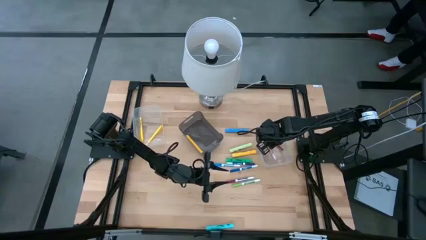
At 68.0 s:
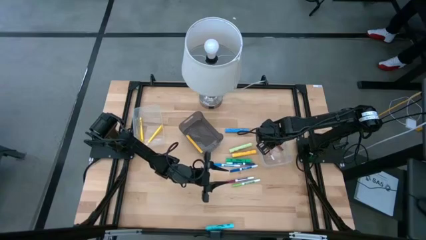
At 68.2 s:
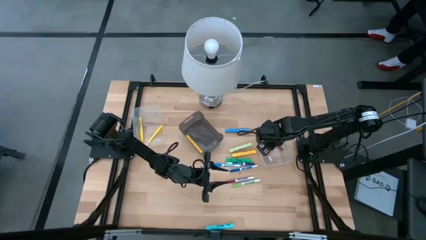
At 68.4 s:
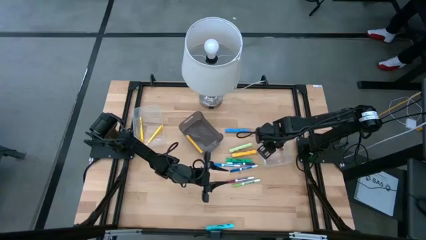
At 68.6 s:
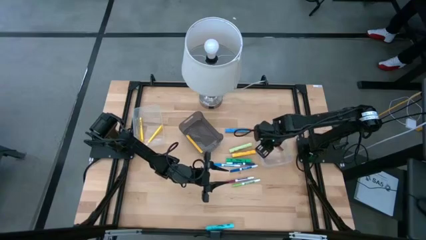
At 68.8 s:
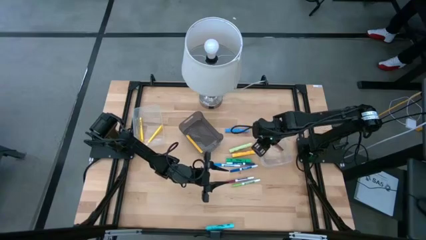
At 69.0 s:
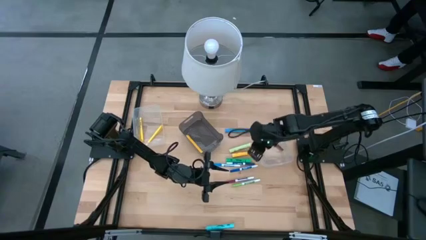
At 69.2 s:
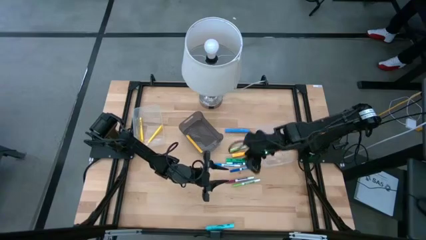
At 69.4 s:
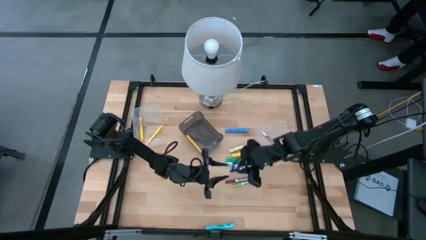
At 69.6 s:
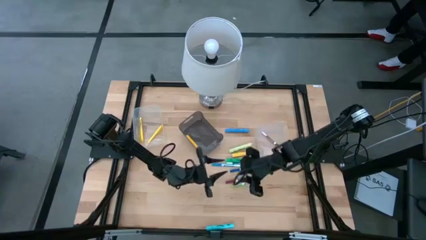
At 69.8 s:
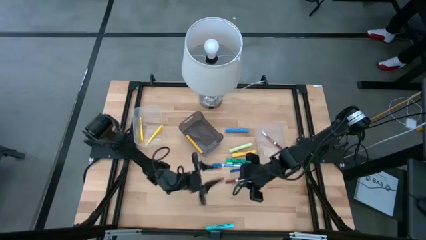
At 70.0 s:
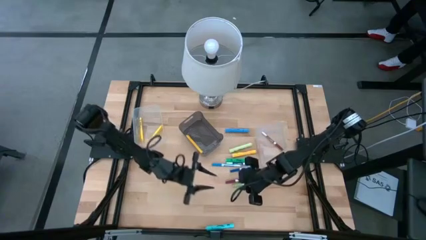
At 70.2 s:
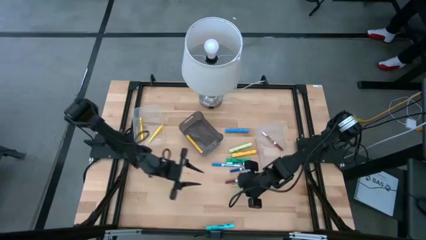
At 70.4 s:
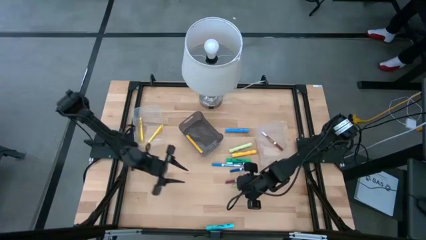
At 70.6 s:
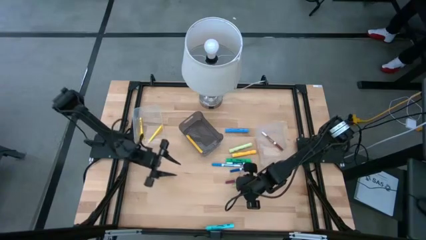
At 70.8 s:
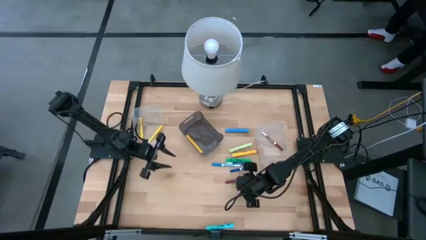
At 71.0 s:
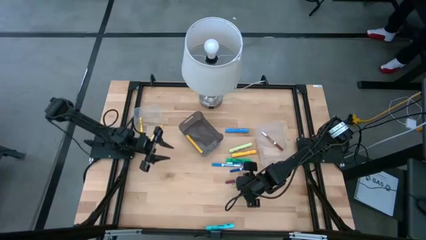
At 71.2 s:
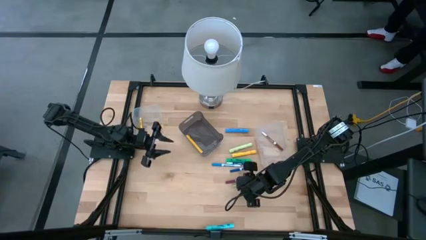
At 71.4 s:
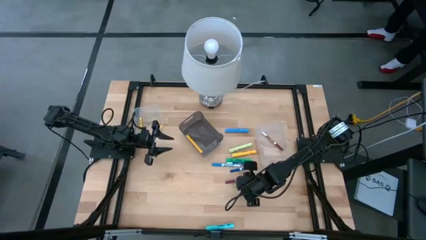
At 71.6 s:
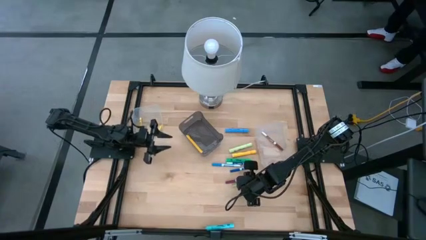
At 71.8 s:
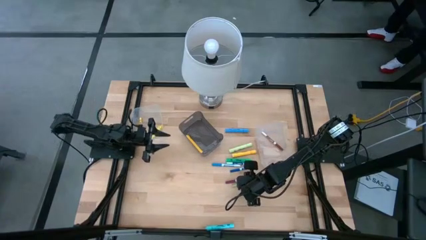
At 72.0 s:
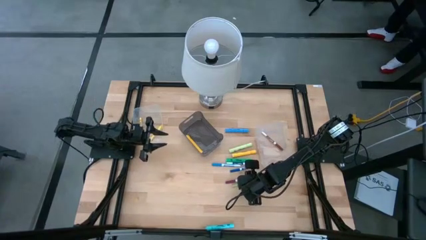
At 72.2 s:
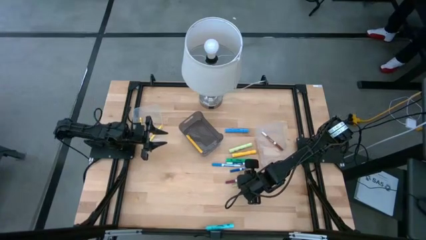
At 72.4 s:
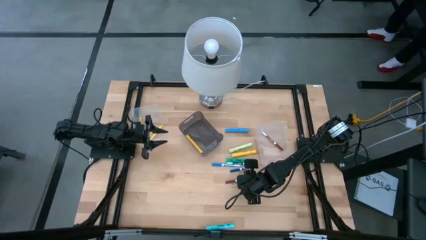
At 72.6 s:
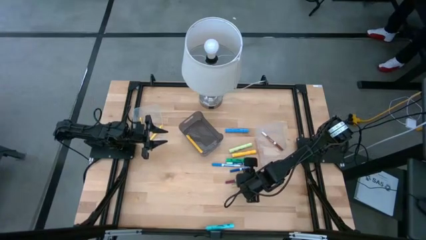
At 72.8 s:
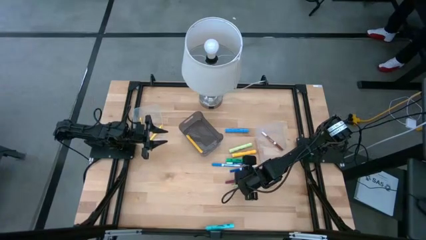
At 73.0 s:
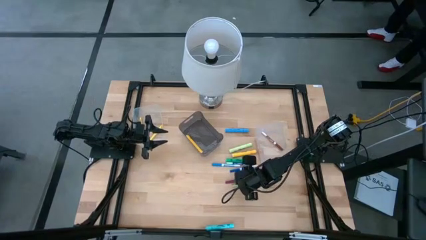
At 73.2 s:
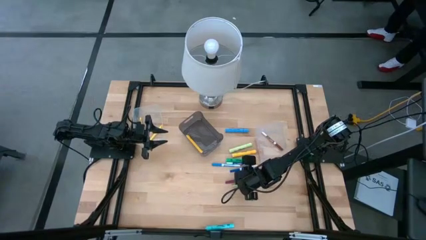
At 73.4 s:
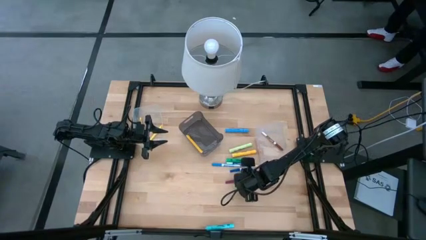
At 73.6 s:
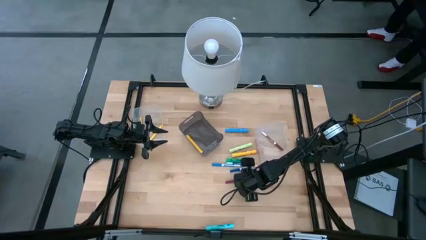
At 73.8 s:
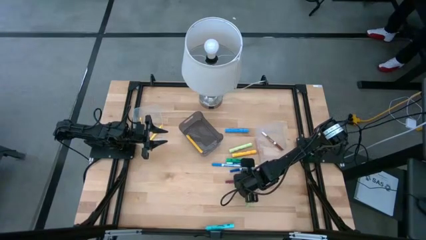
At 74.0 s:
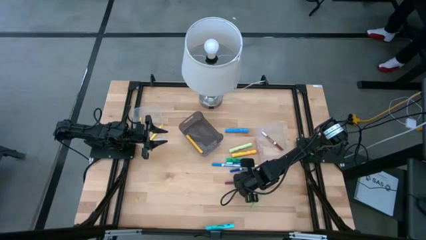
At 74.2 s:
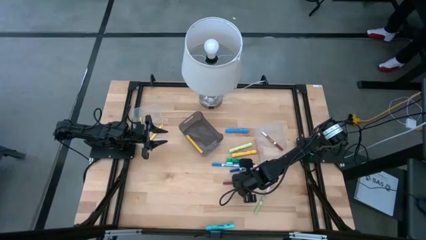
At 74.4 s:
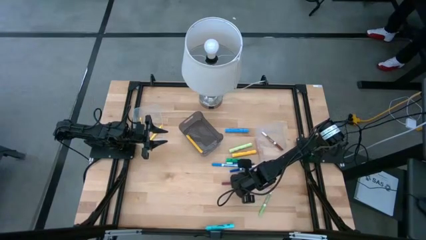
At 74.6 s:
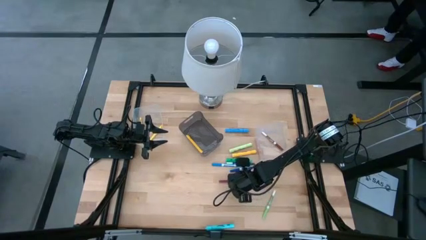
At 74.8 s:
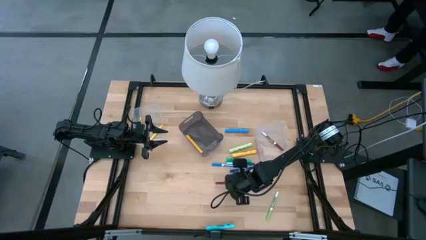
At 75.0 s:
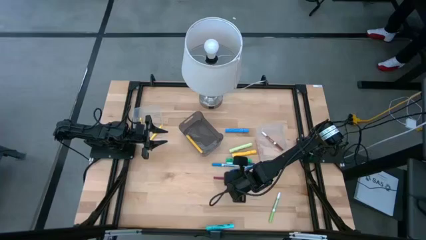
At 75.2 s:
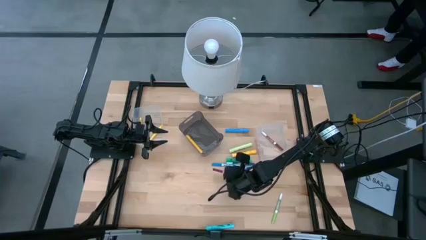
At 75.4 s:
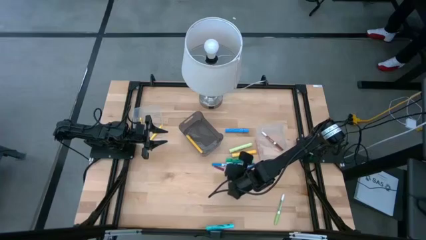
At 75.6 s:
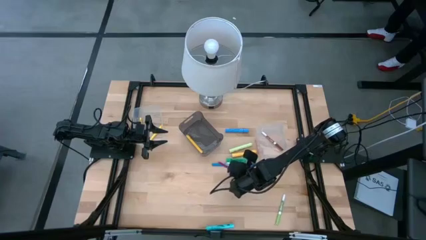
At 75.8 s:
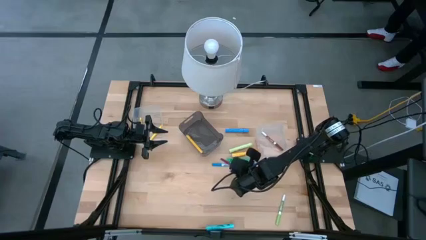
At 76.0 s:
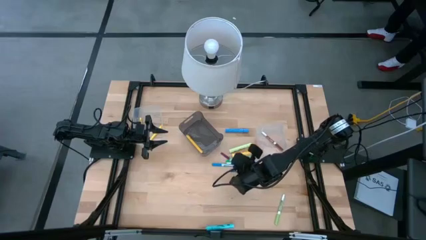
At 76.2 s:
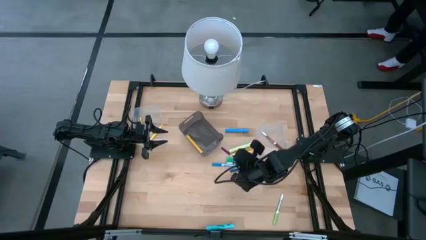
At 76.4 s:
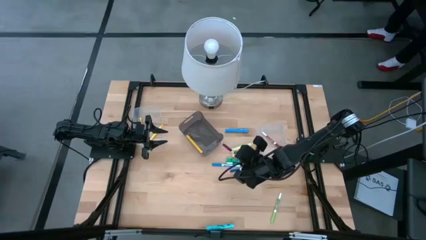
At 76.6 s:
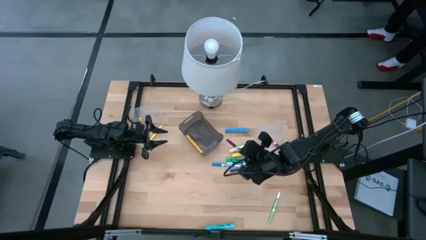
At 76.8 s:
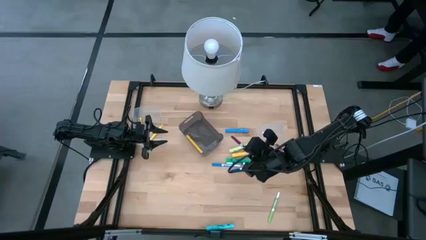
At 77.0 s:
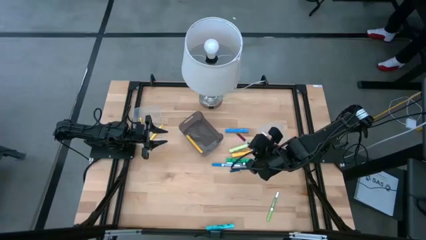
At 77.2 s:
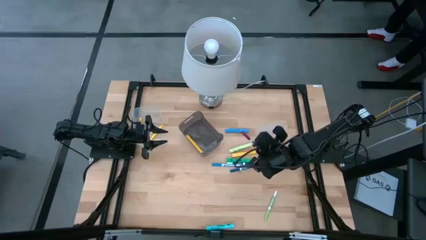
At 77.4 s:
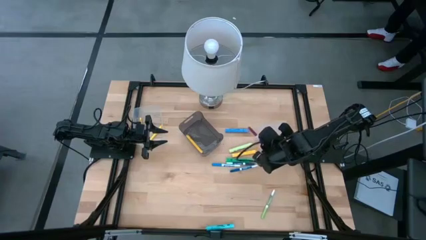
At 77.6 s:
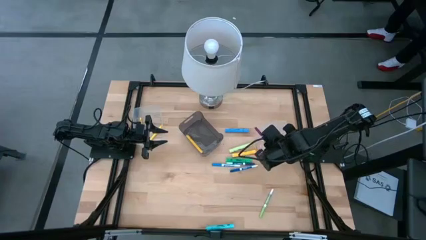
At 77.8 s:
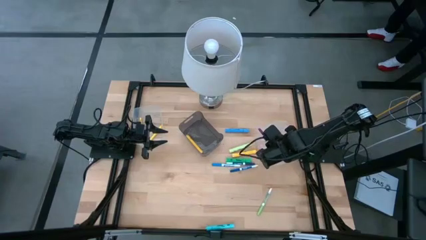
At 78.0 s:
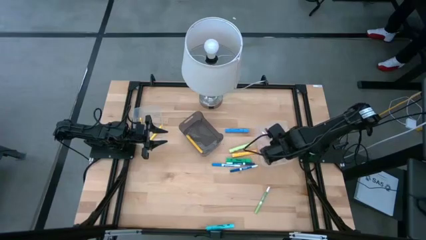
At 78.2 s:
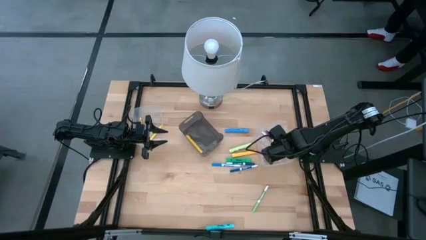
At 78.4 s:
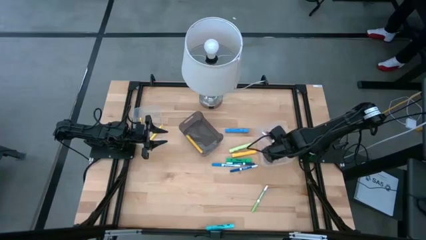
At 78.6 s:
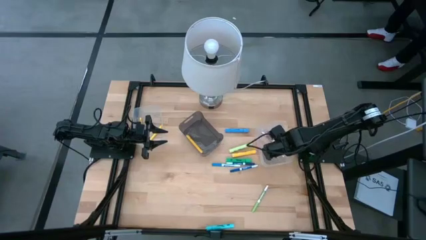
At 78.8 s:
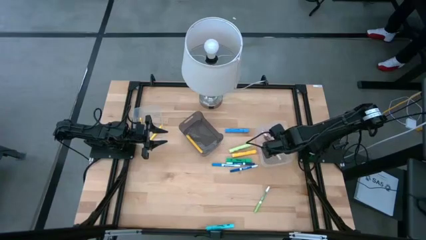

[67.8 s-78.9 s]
Task: Pick & Place Markers
Put the purple highlighter into the right transparent bin

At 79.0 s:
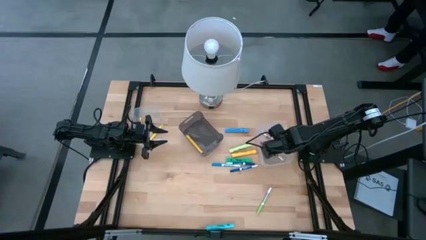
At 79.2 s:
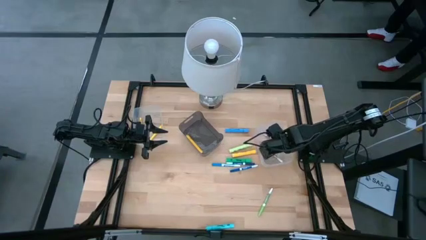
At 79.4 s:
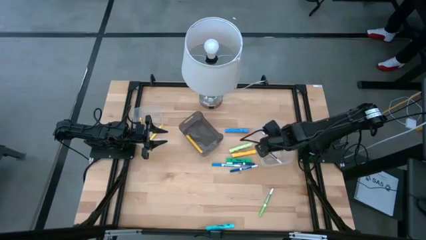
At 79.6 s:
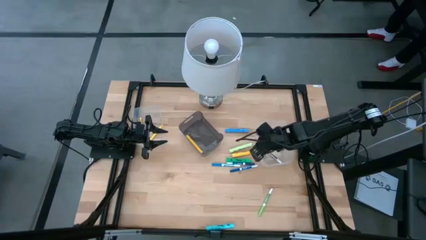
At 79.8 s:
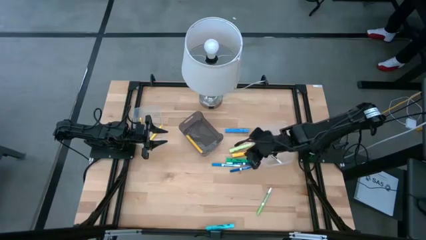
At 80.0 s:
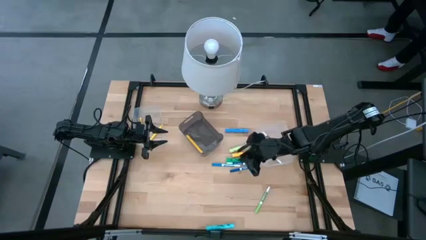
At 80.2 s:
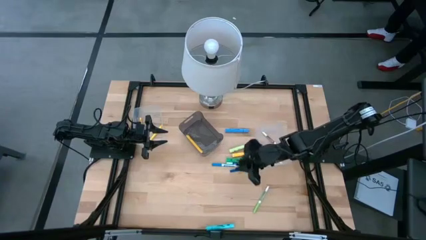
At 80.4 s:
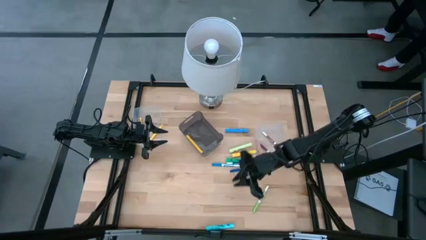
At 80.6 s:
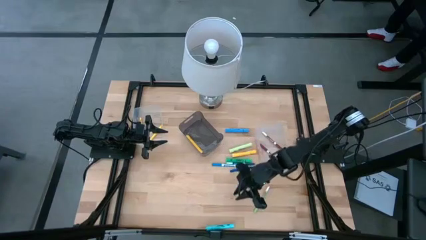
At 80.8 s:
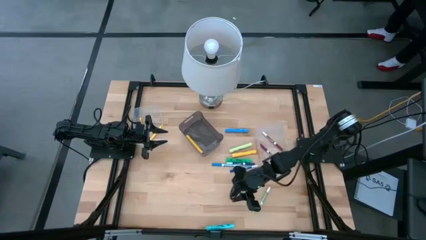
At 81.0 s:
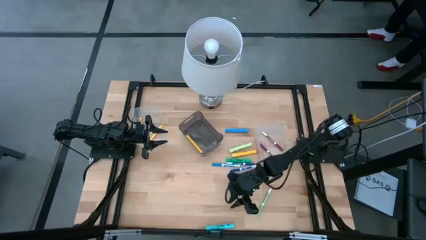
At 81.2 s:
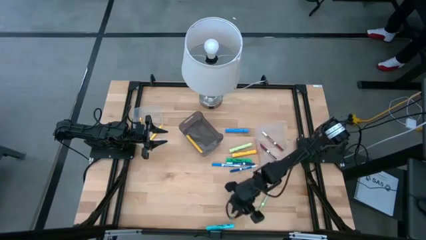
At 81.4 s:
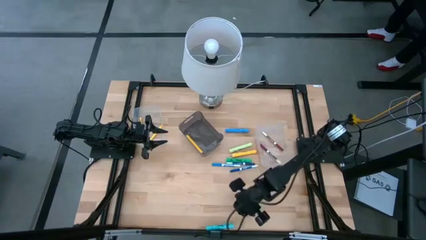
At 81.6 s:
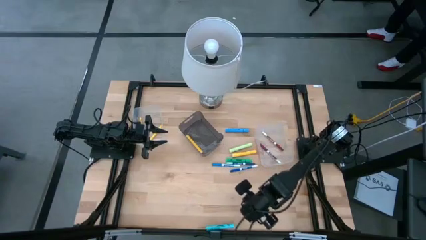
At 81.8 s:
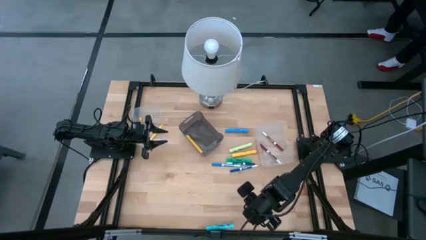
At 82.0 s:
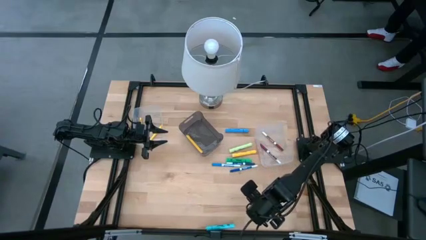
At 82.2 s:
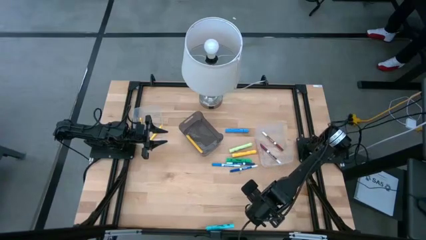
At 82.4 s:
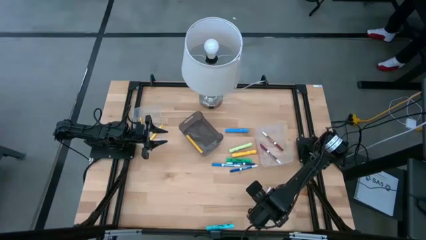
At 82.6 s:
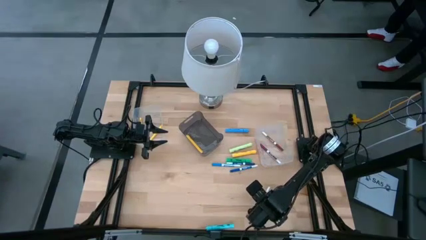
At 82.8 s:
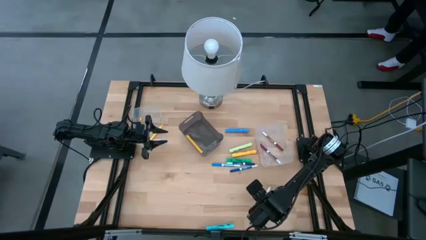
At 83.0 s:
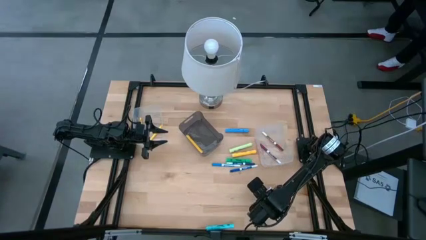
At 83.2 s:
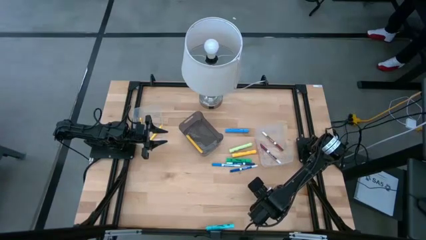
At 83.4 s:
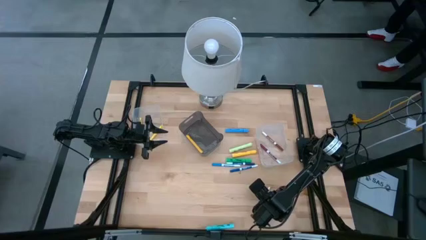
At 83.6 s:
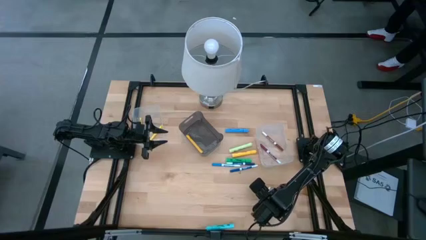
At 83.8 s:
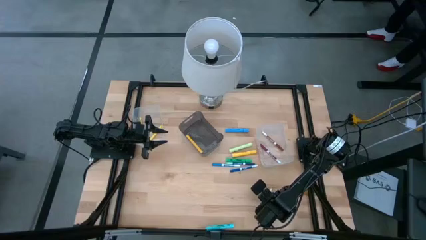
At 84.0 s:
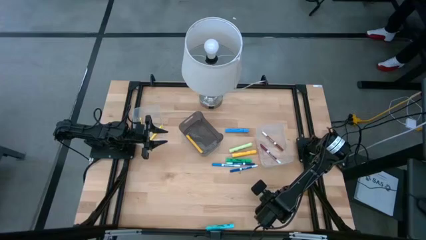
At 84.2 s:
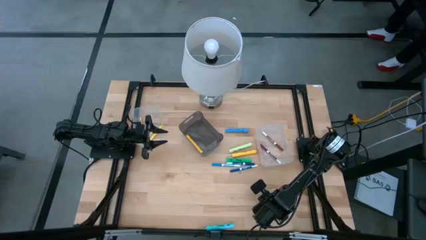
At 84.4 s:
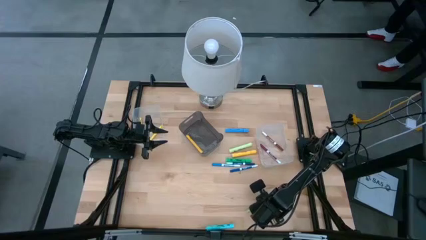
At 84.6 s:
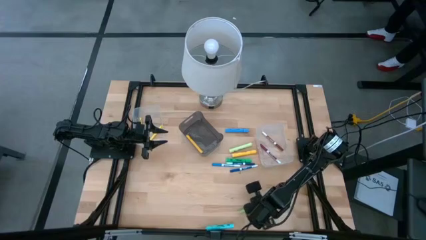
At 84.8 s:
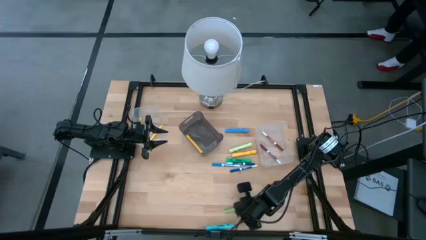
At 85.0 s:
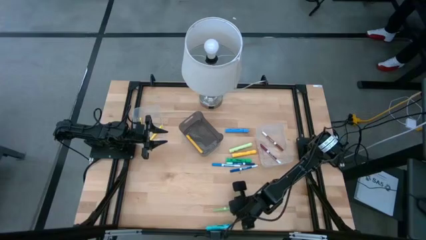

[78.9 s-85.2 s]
Put the green highlighter into the right transparent bin
